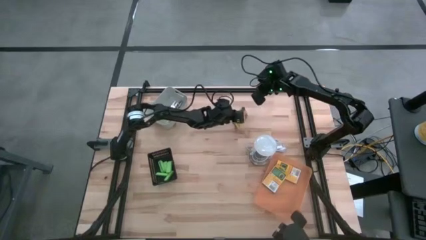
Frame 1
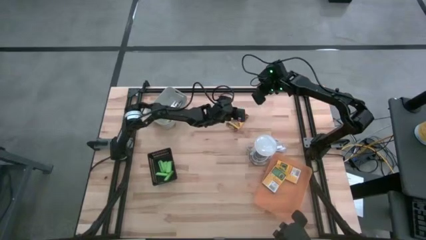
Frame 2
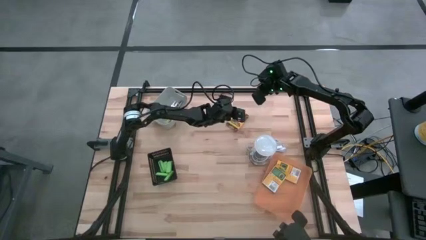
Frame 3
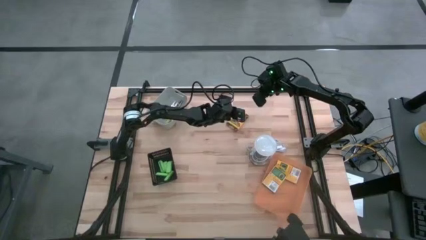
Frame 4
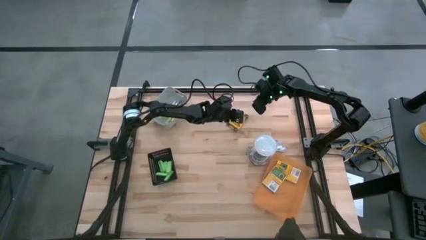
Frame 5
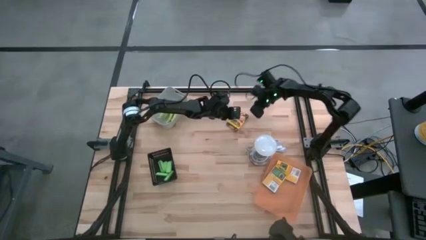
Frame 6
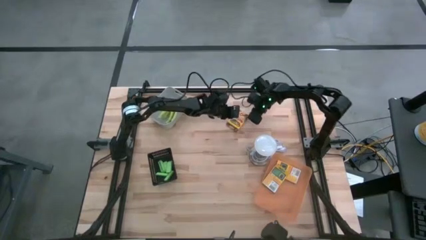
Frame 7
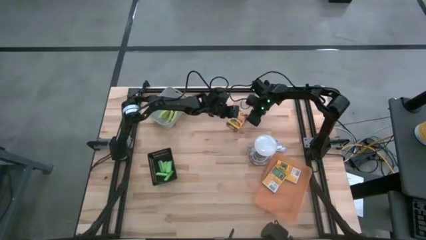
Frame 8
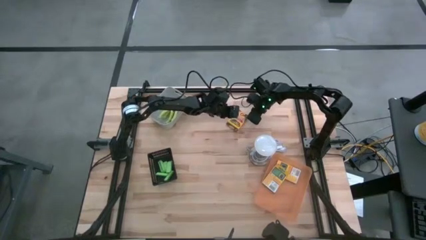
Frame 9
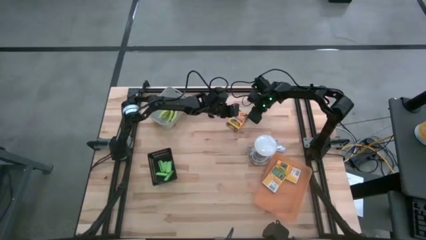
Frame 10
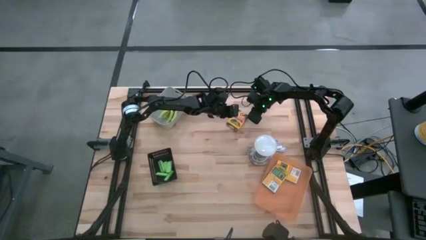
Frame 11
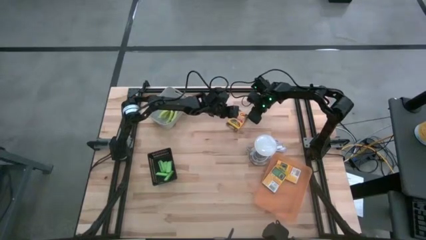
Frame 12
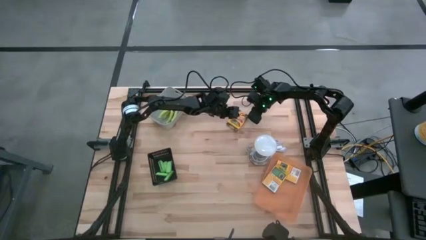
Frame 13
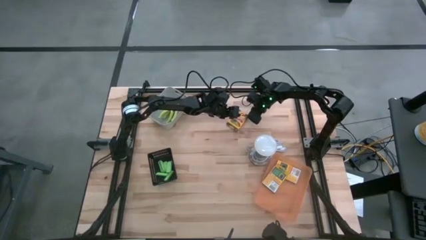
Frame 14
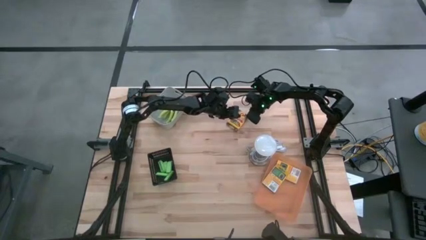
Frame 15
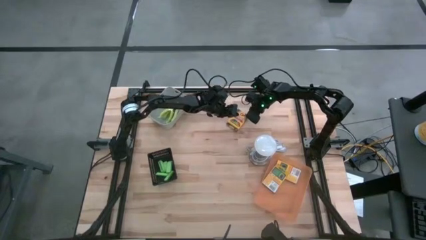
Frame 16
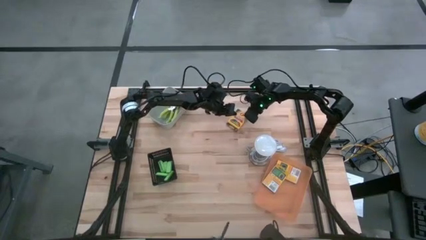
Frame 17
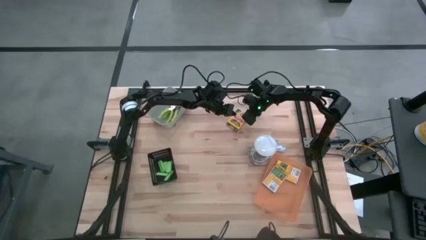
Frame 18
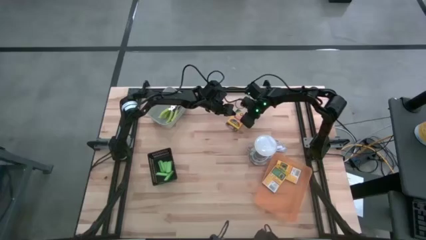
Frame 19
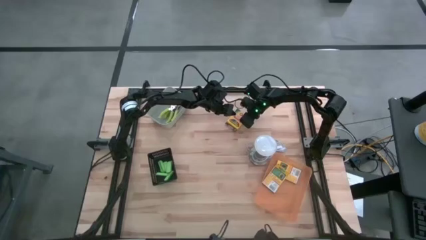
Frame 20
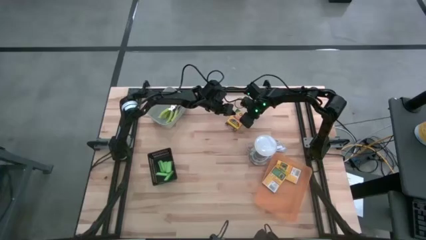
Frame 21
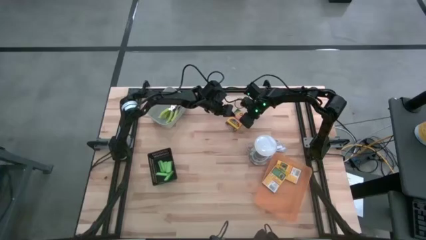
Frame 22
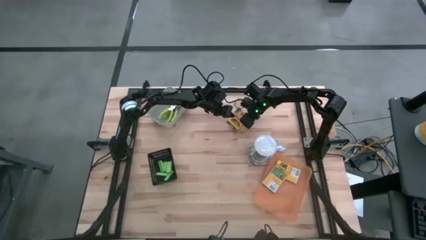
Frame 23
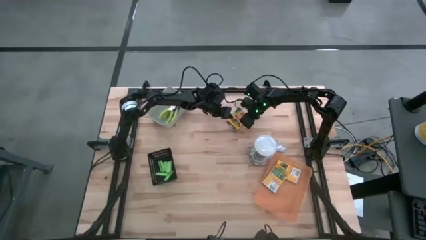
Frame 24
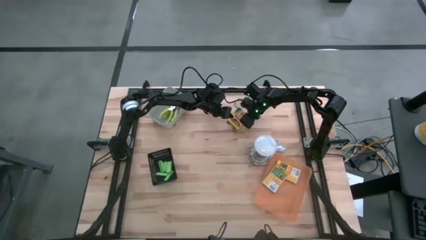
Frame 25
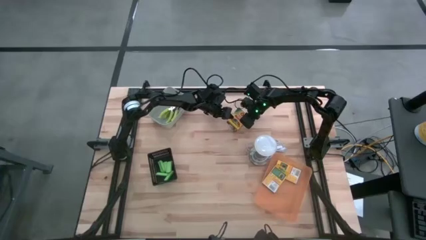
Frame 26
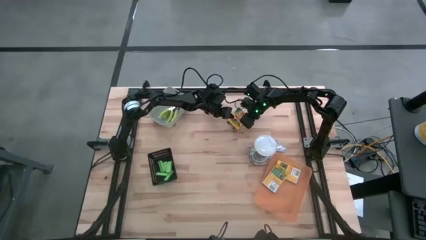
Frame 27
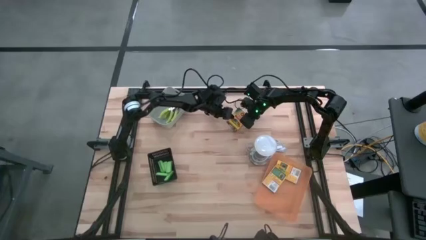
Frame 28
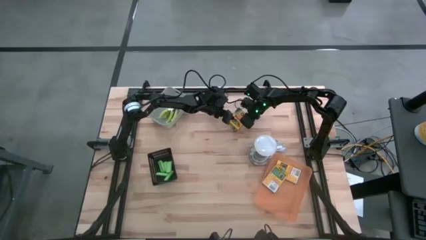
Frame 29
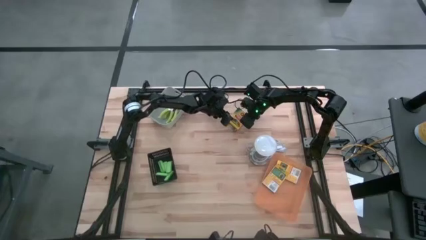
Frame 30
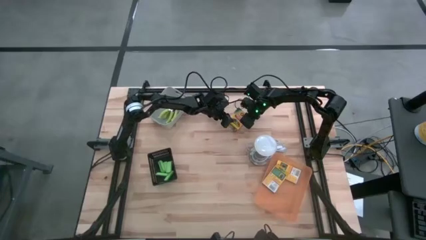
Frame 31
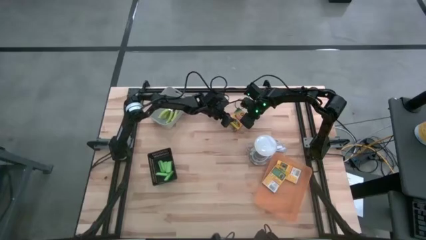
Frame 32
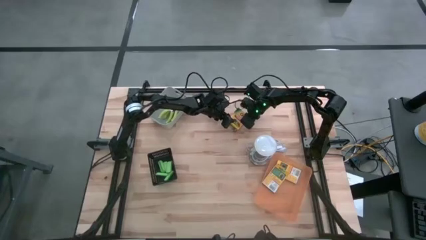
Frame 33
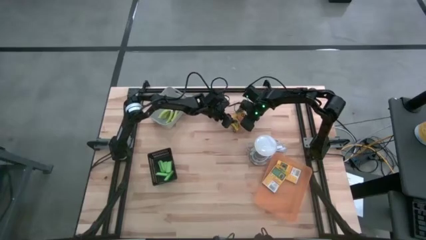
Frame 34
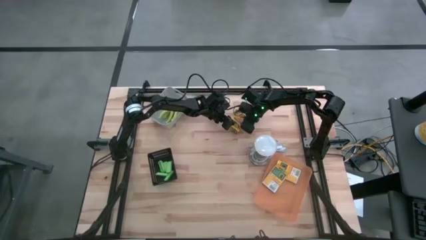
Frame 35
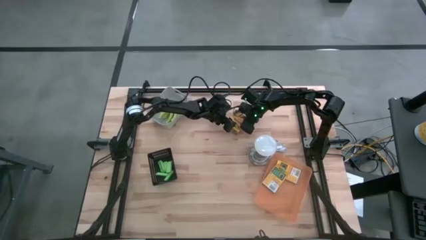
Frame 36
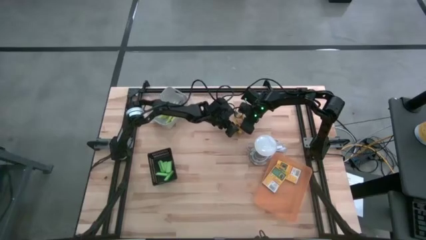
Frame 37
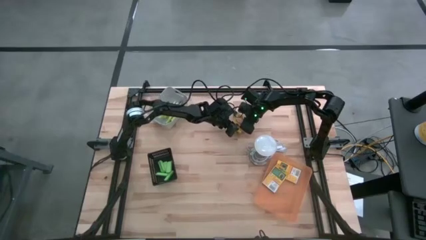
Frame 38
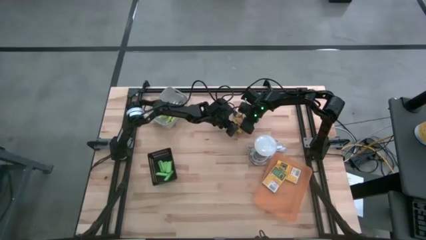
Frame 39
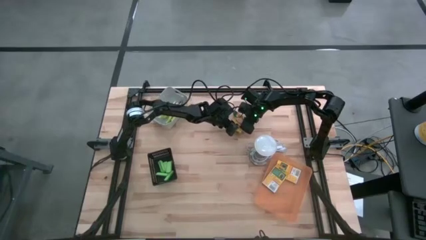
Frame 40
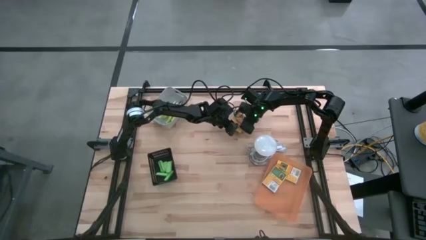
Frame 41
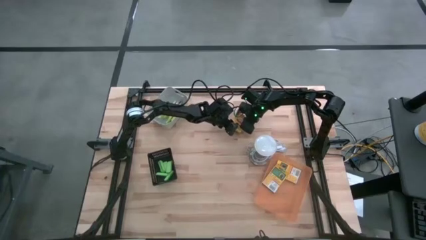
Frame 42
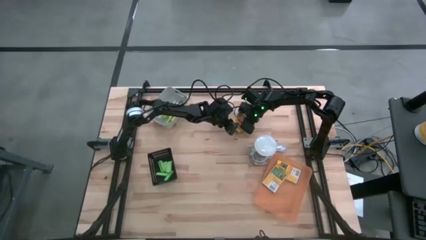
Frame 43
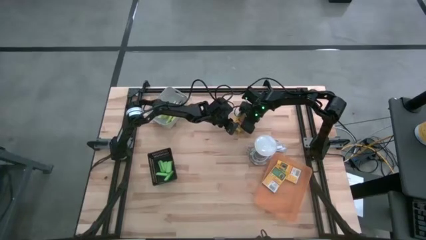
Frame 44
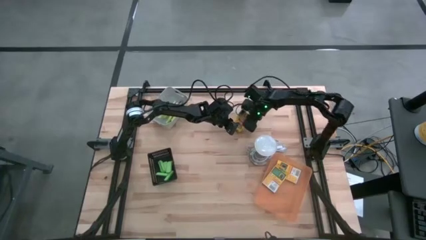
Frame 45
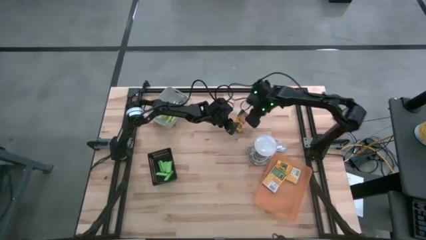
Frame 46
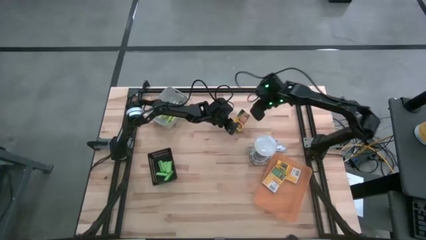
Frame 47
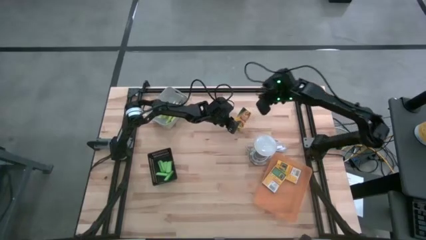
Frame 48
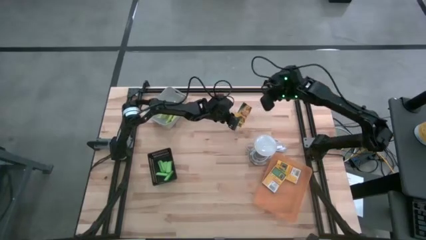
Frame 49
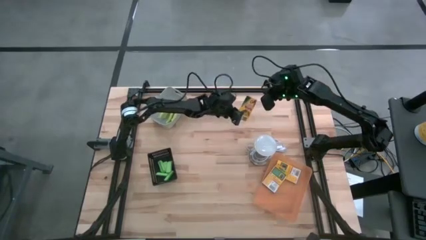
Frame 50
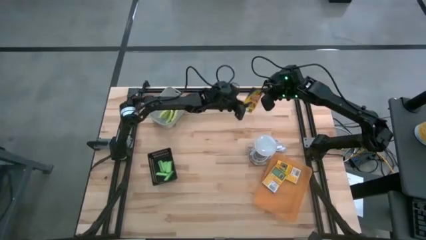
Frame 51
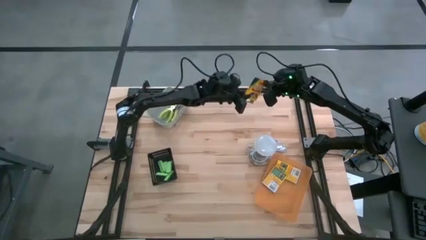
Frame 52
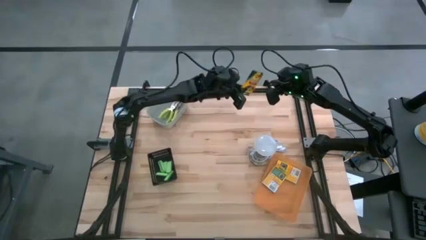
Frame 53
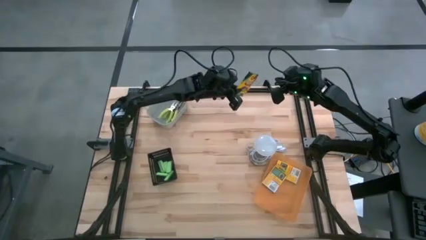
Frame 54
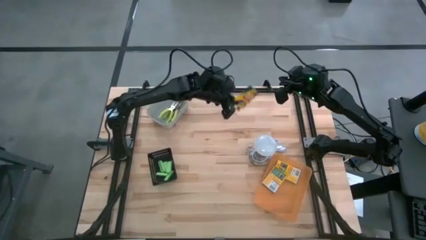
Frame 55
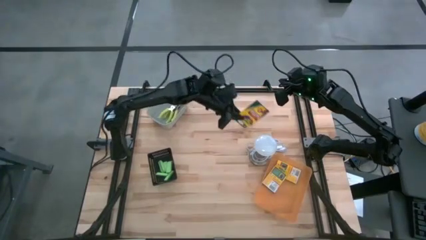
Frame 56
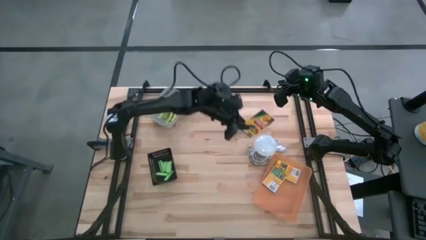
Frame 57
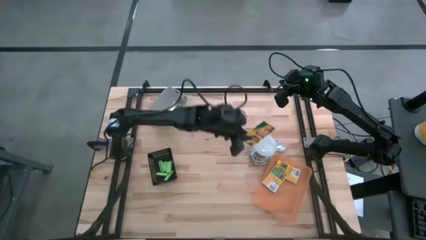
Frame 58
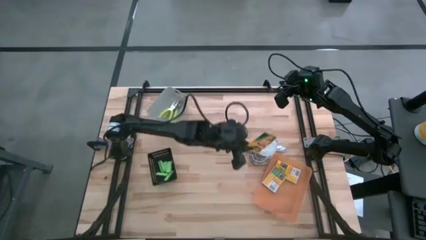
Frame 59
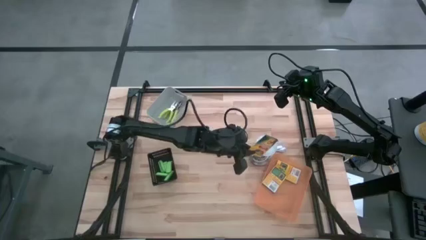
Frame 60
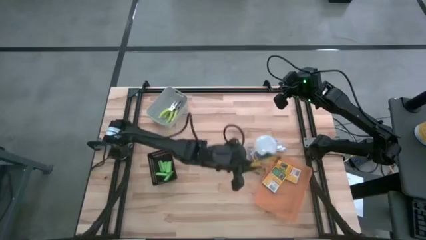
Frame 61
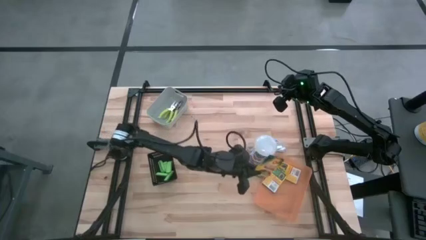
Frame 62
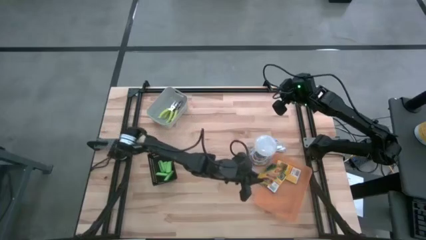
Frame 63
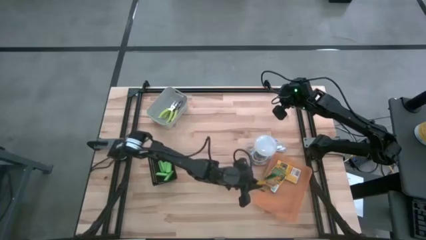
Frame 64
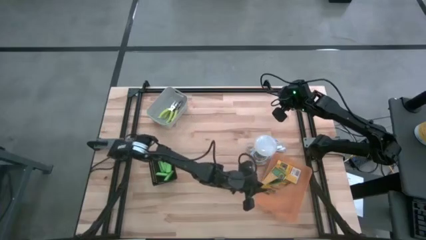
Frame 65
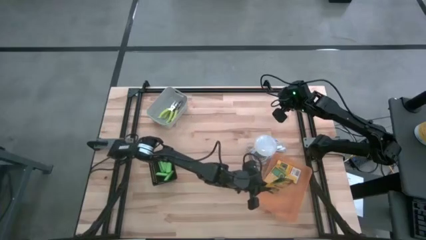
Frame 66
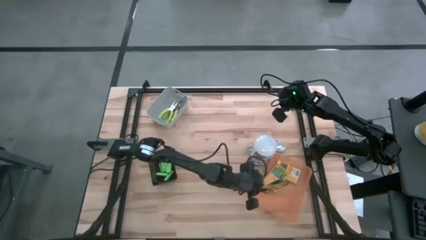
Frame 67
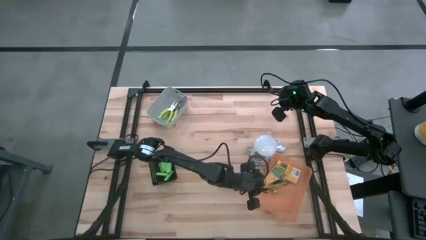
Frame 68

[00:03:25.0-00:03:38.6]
Task: Pick & Place School Supplies
Put the yellow yellow crayon box into the orange bin

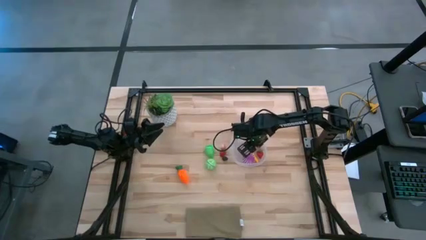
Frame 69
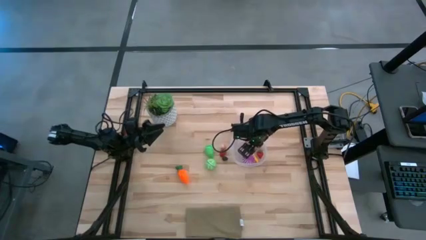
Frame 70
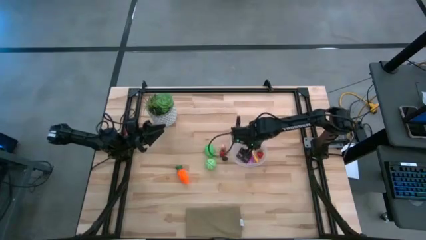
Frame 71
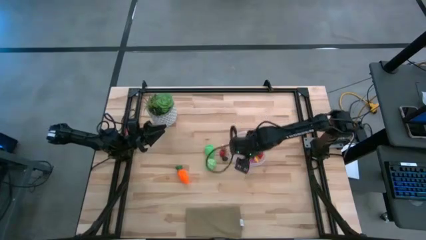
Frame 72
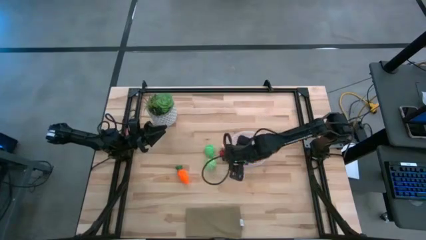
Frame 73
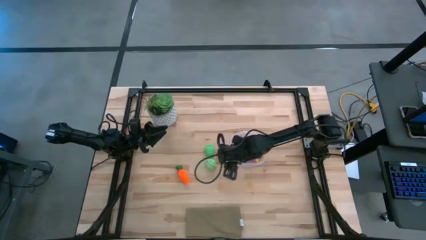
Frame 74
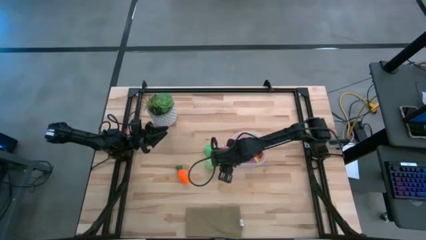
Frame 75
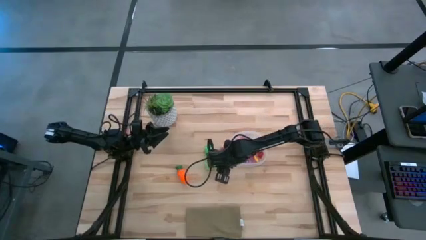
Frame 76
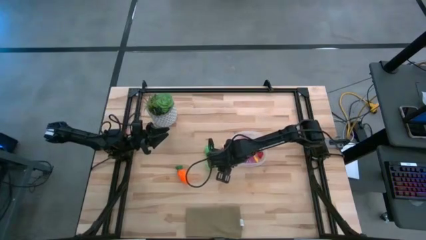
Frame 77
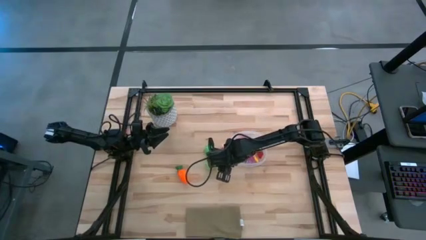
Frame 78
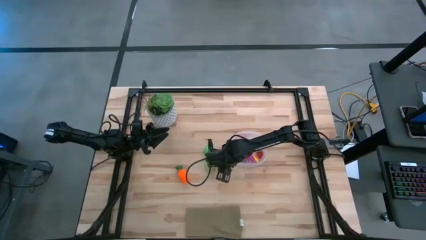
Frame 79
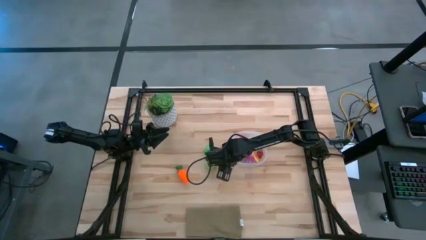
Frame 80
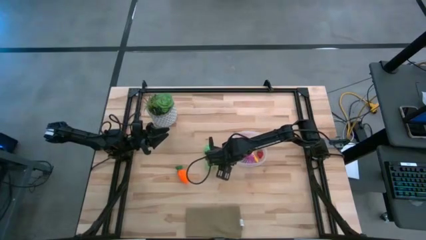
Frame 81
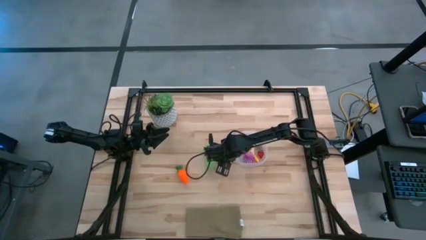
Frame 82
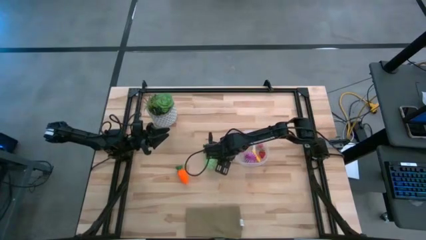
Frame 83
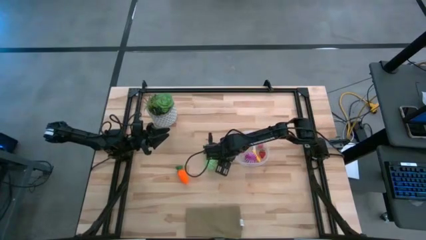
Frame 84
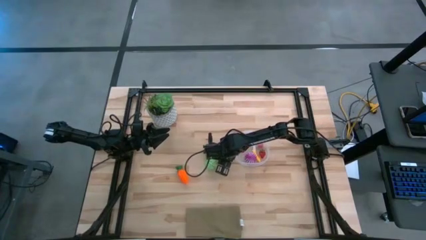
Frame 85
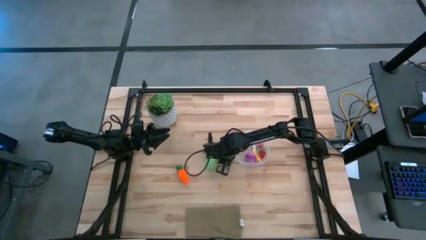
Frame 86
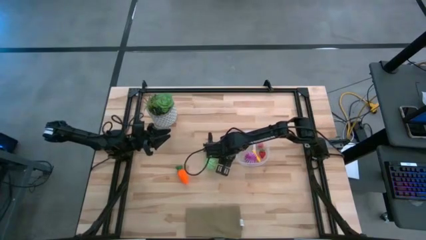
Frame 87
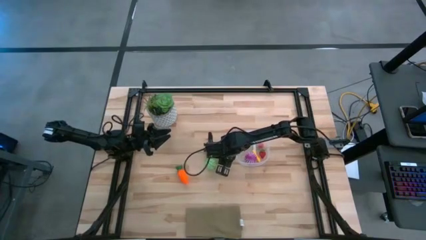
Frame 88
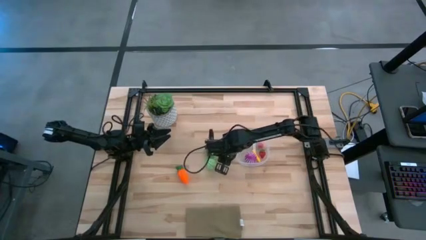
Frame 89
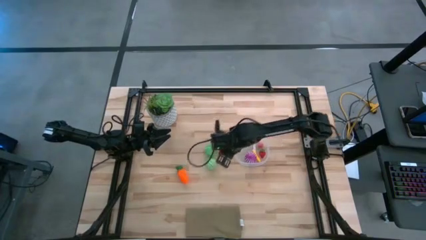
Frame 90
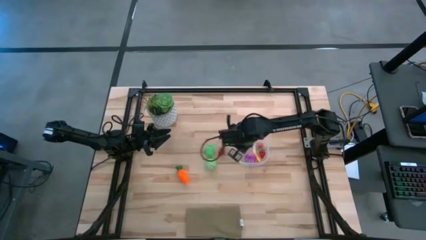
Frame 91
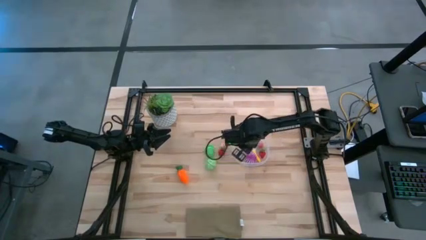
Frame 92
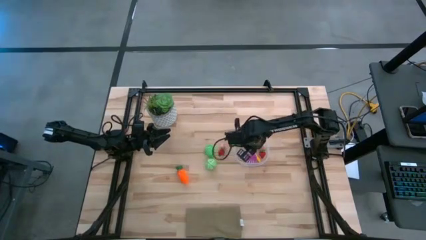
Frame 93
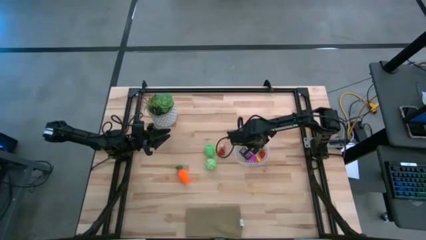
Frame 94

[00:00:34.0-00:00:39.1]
Task: Pick and placing Produce into tupperware
Put the blackberry into the transparent container
